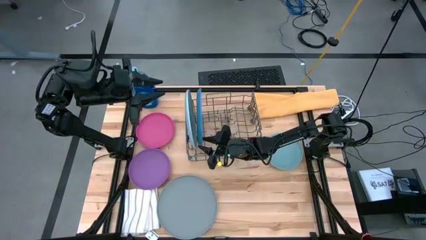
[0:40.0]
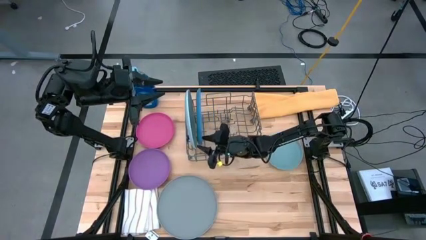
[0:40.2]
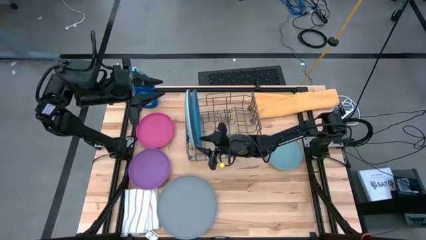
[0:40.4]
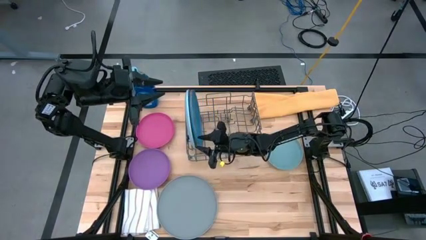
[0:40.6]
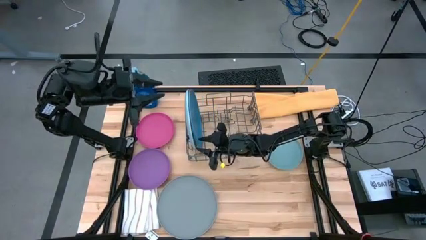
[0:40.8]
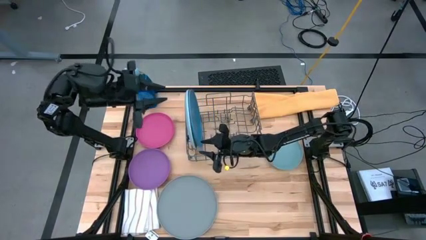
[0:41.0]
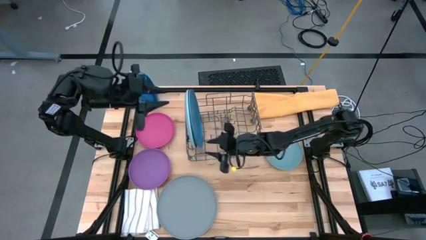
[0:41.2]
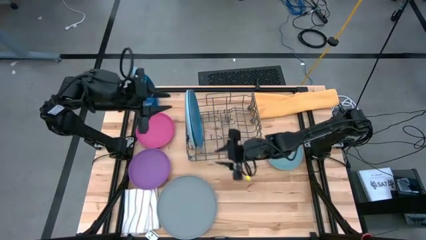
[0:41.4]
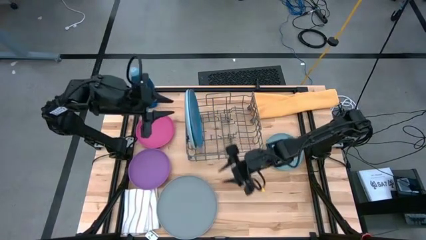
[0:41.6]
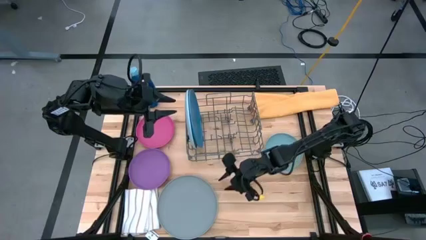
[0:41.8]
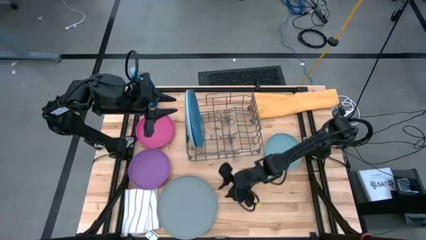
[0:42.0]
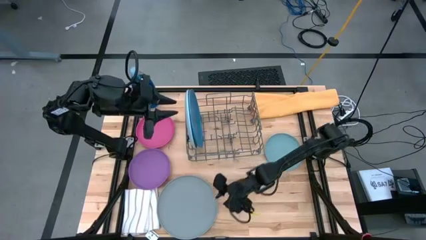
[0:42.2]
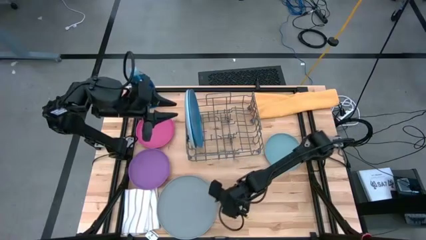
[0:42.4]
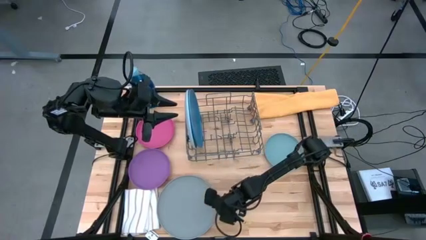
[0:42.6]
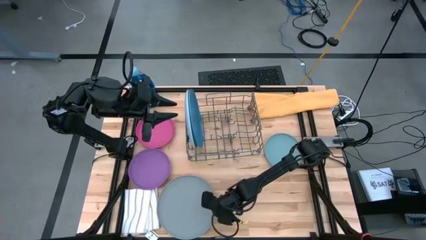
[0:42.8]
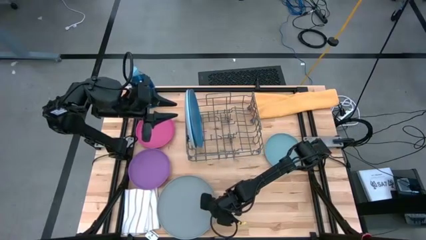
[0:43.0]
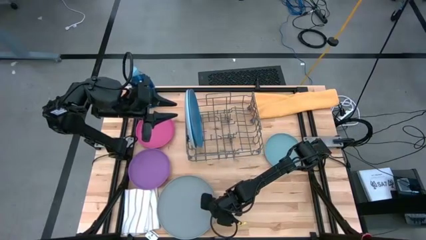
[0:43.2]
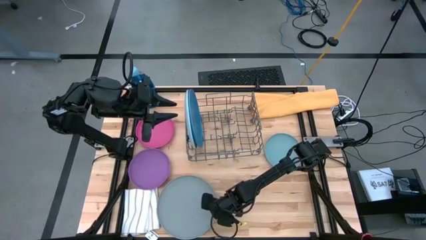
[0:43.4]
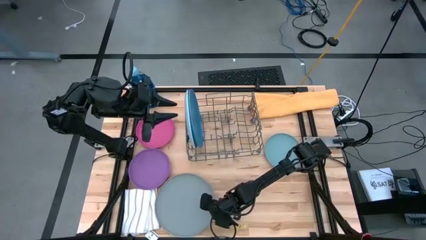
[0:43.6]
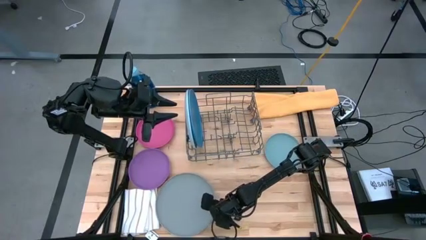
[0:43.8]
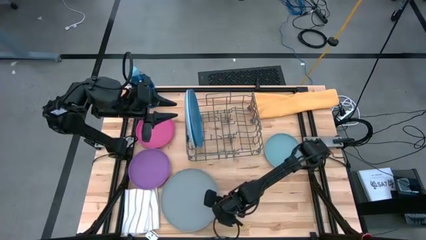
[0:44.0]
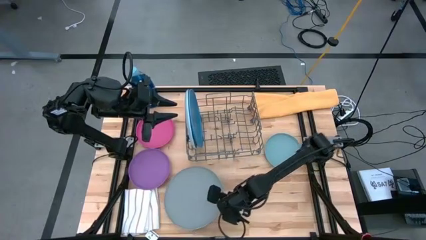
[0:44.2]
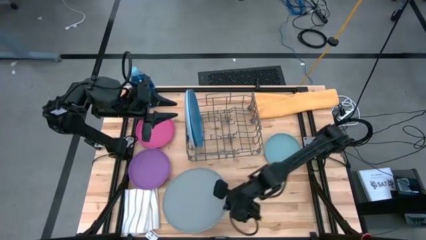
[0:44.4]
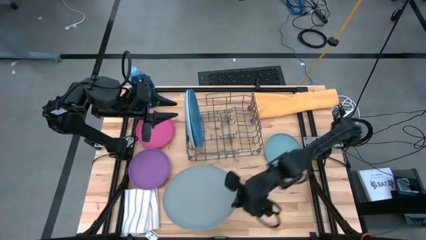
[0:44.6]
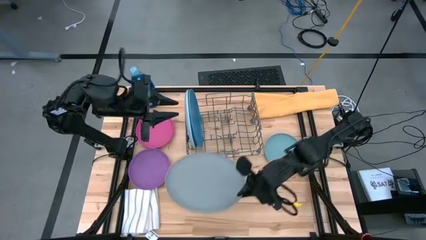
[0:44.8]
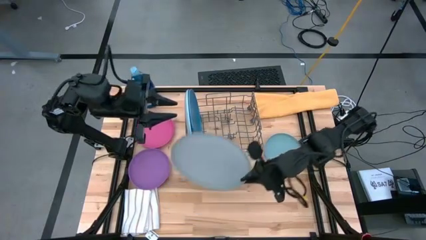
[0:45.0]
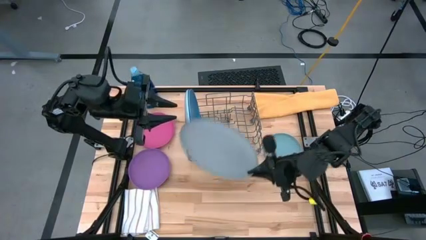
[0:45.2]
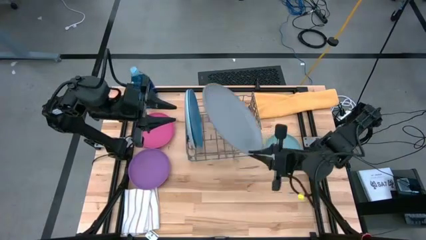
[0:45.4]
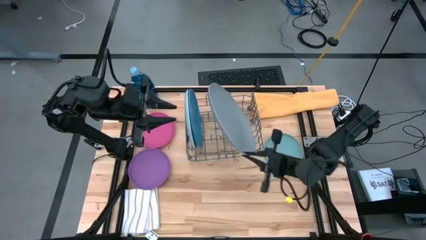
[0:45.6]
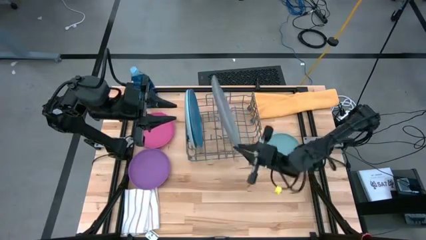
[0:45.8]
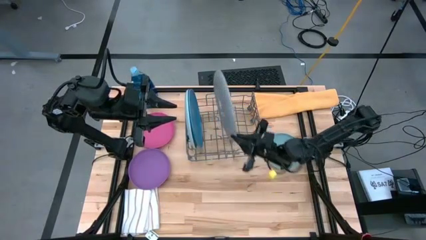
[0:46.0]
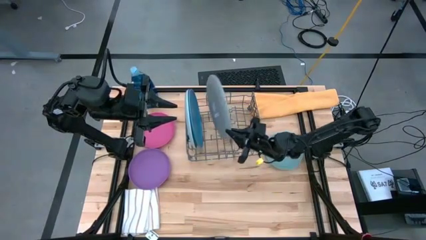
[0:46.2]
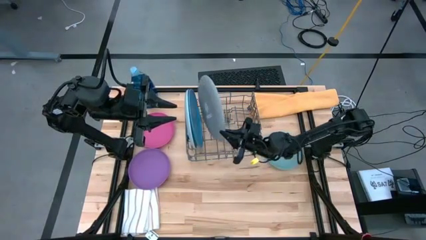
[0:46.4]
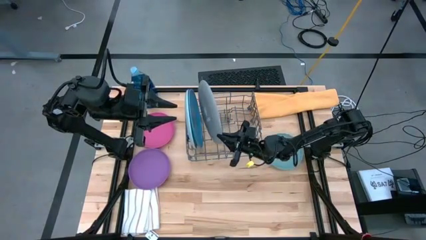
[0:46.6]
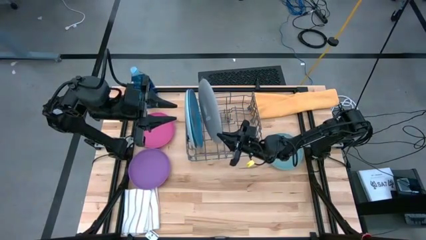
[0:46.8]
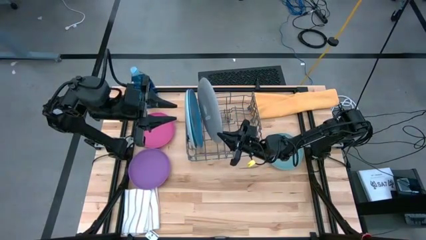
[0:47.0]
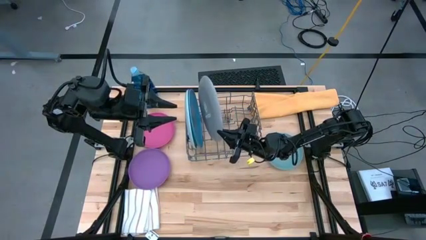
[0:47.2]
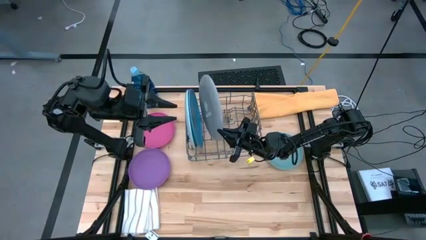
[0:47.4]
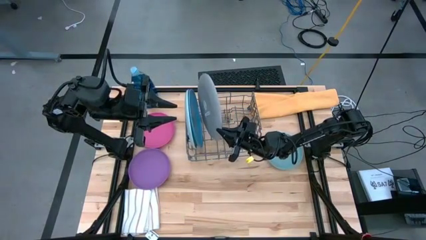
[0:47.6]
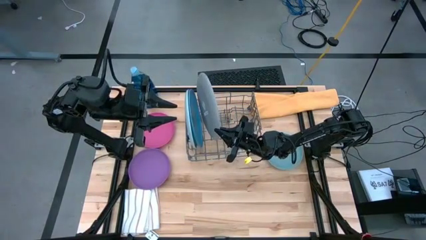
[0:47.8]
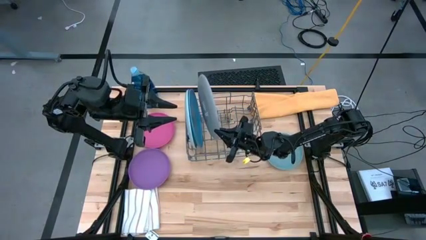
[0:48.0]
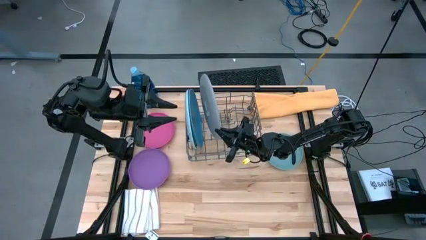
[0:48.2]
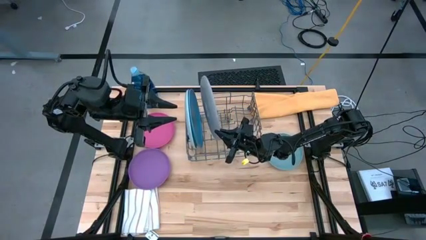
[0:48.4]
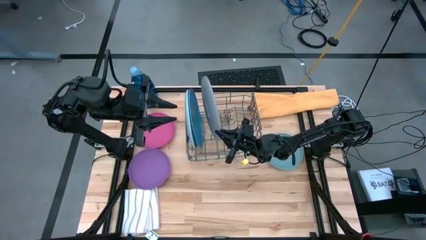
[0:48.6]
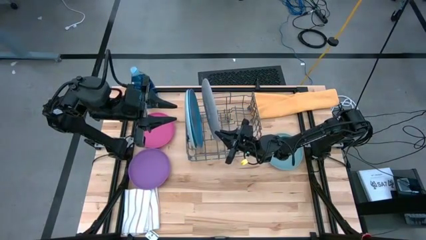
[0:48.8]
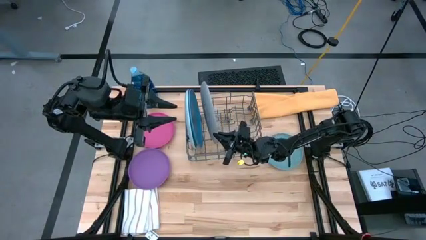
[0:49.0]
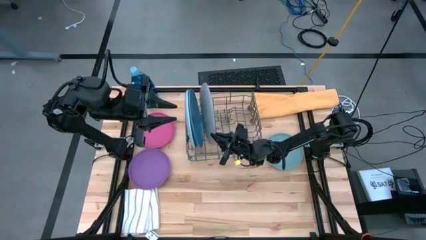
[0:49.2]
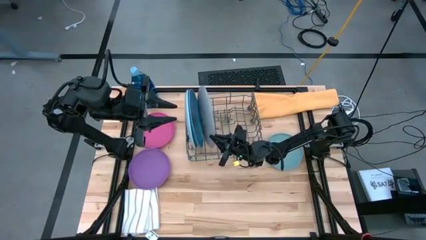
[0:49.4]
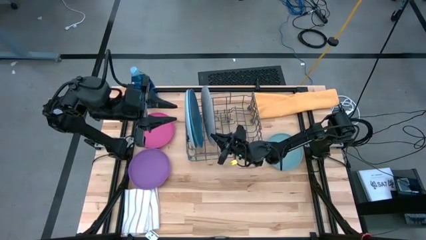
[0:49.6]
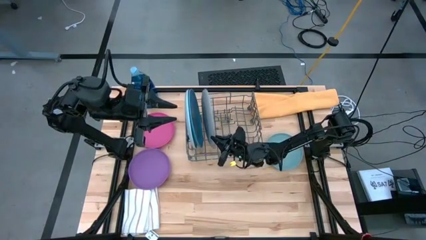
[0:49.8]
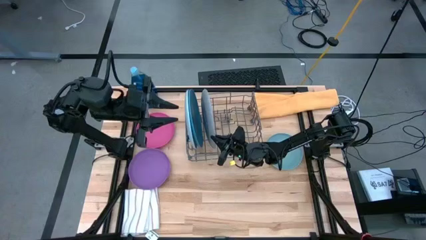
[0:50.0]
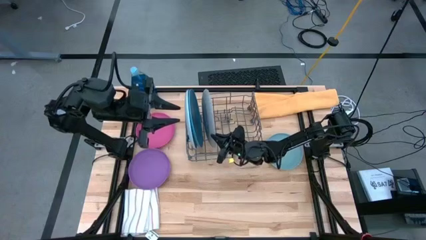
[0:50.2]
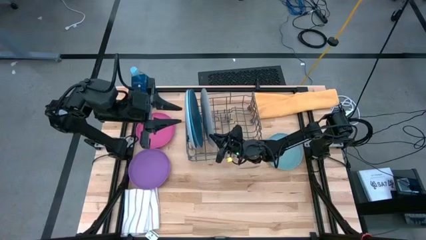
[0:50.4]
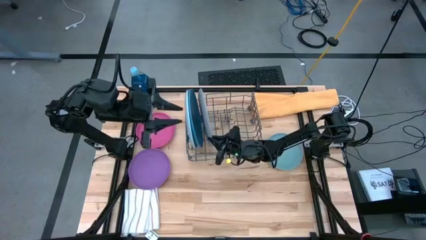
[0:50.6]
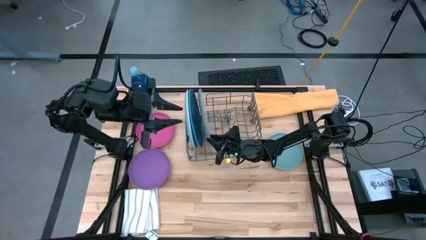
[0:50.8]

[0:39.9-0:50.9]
Task: Sort dishes
Put the gray plate into the dish rack
